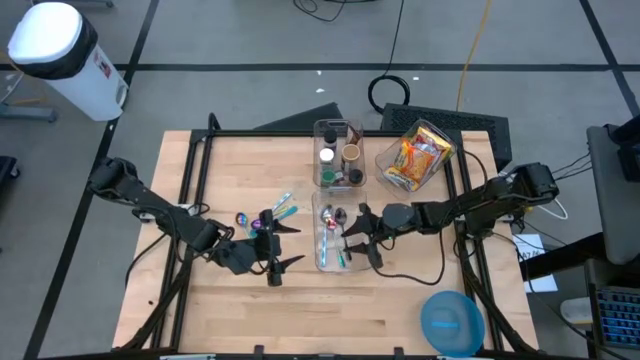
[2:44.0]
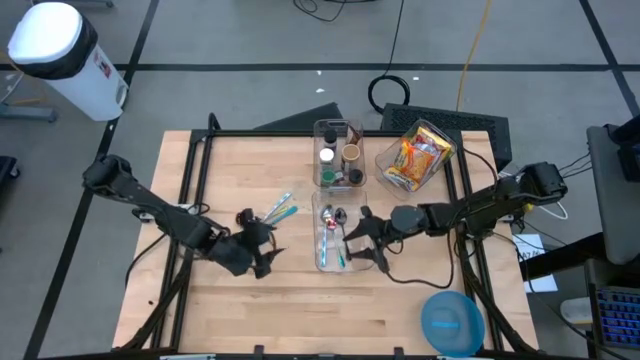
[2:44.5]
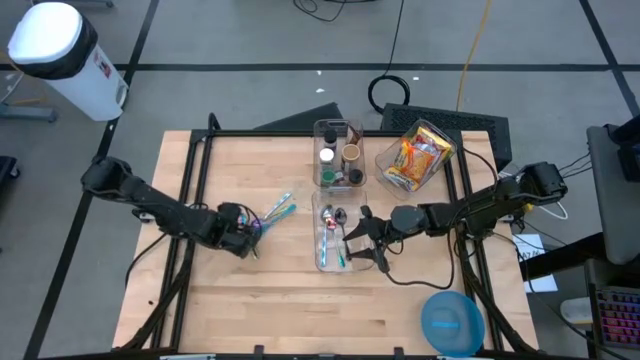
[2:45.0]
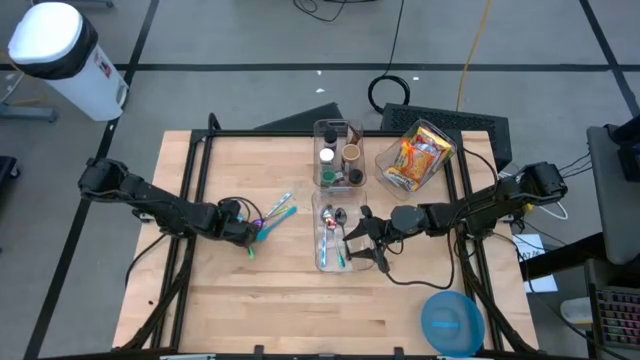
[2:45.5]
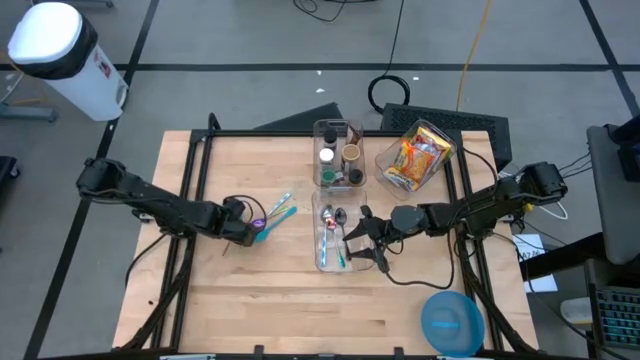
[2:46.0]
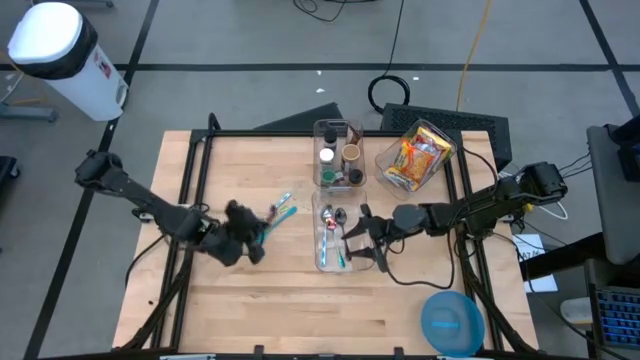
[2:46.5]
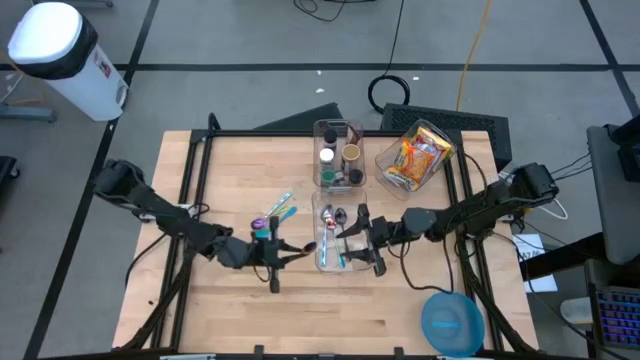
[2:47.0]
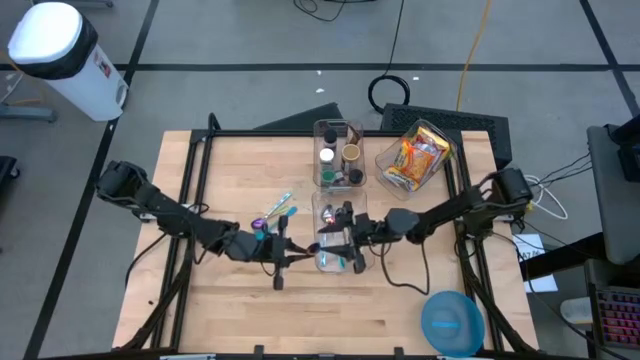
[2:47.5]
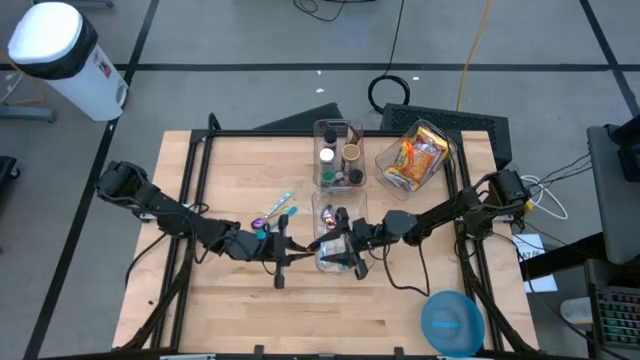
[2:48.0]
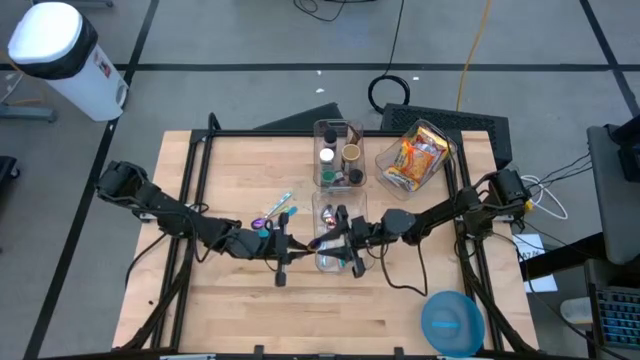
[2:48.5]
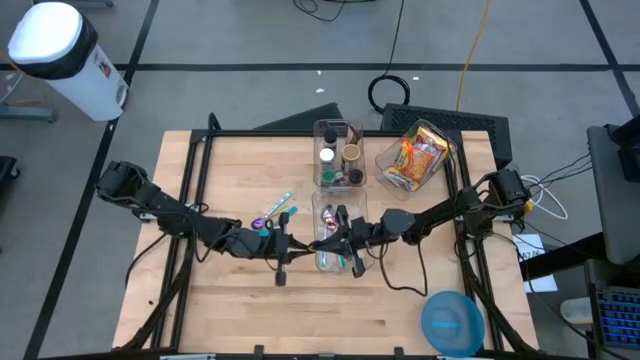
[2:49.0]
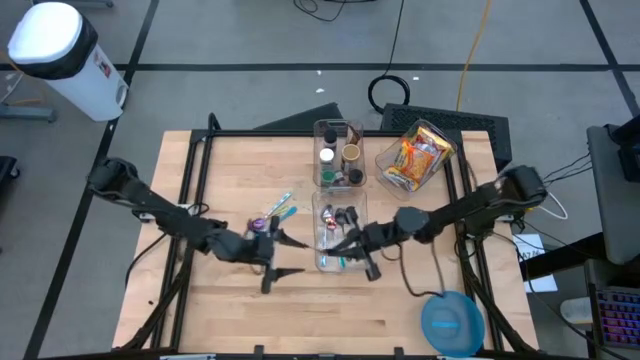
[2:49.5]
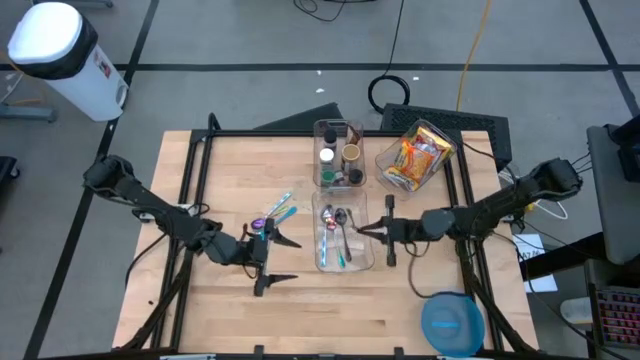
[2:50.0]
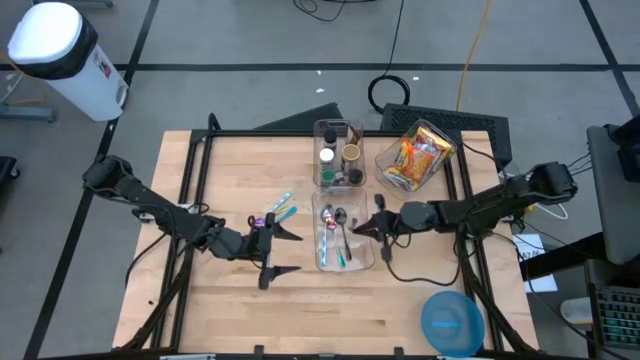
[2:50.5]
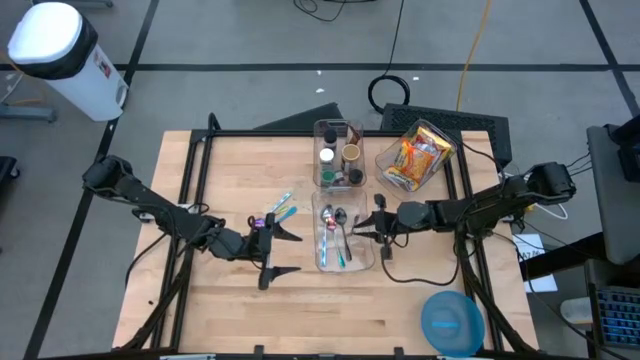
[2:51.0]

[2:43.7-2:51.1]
Task: Pick & Place Food Item
Put the bottom rainbow spoon into the bottom transparent bin

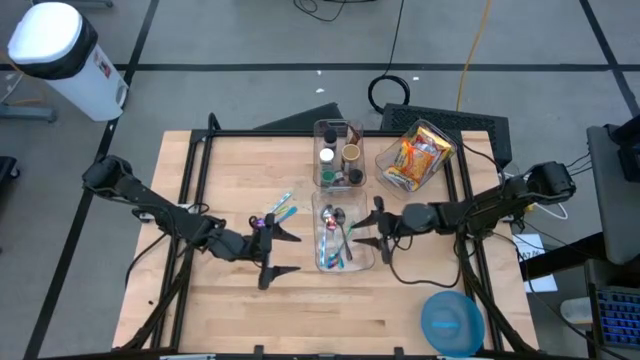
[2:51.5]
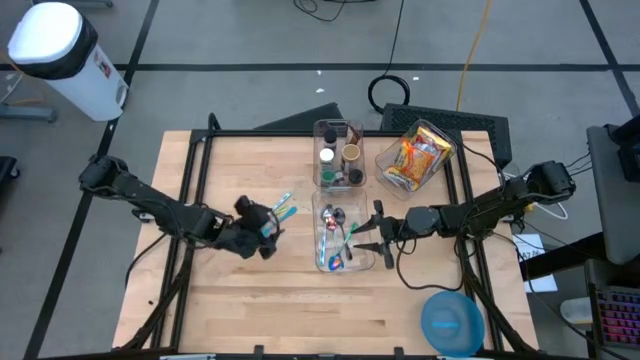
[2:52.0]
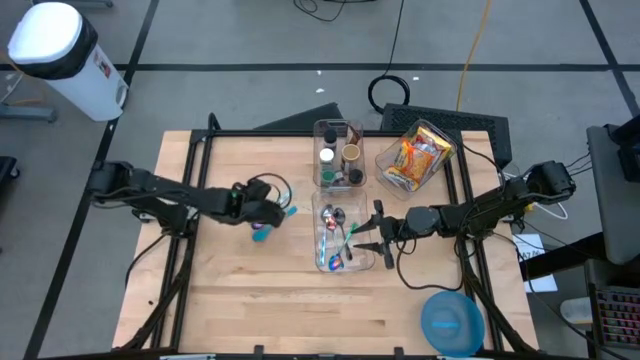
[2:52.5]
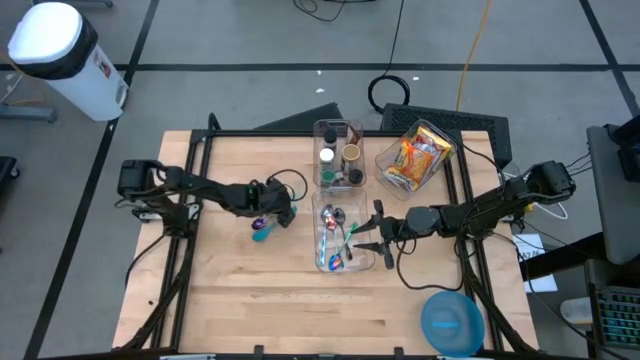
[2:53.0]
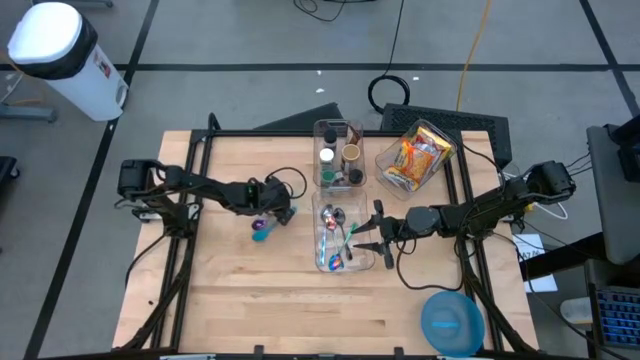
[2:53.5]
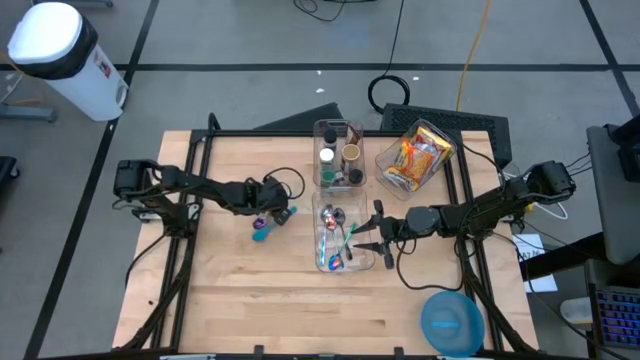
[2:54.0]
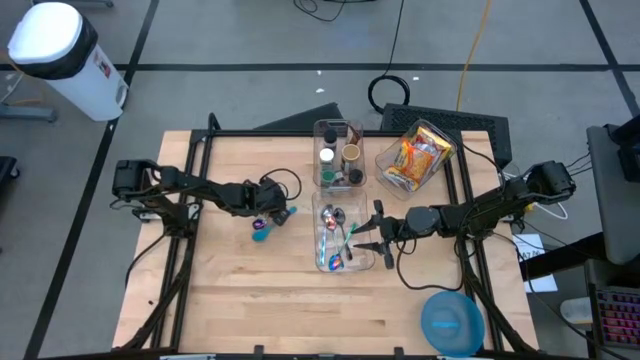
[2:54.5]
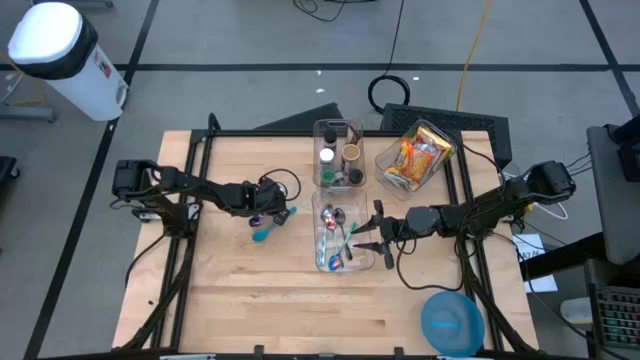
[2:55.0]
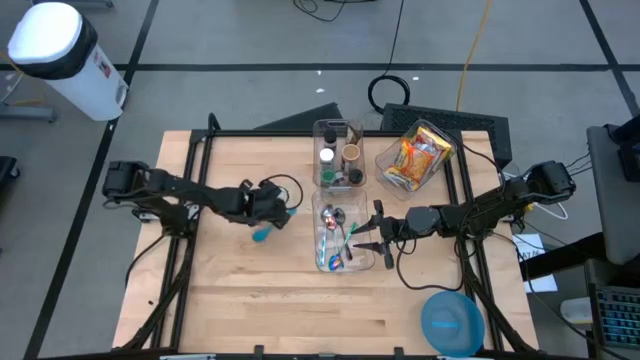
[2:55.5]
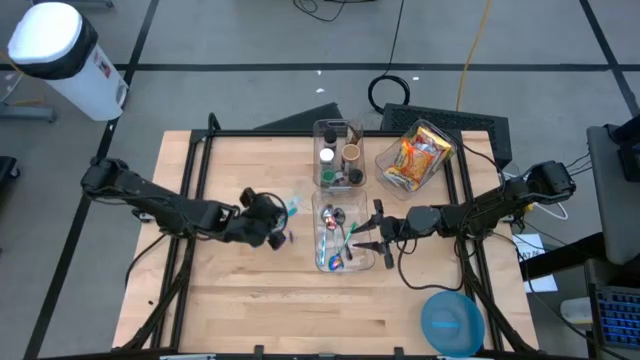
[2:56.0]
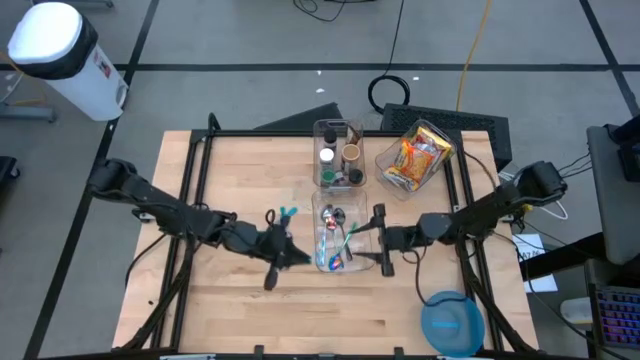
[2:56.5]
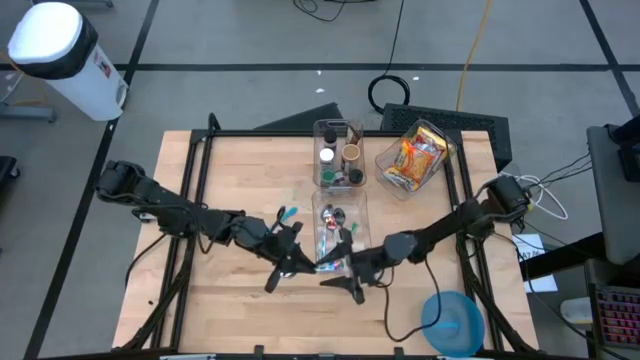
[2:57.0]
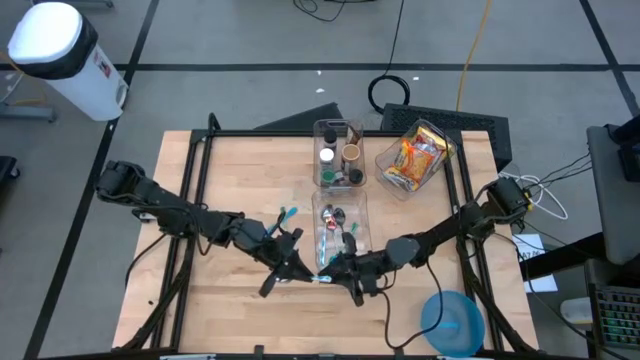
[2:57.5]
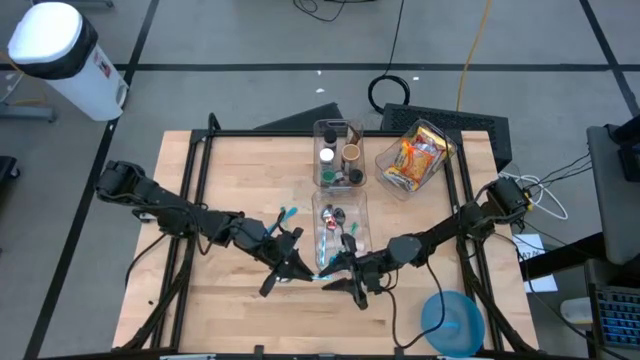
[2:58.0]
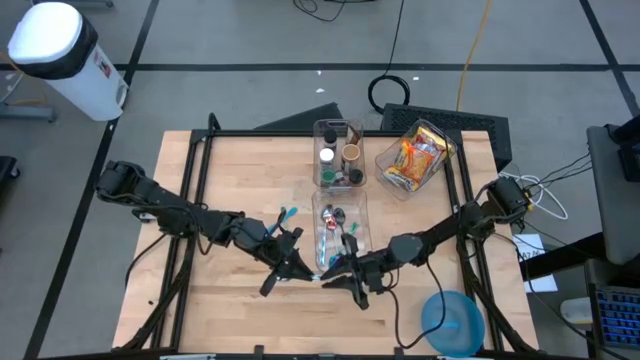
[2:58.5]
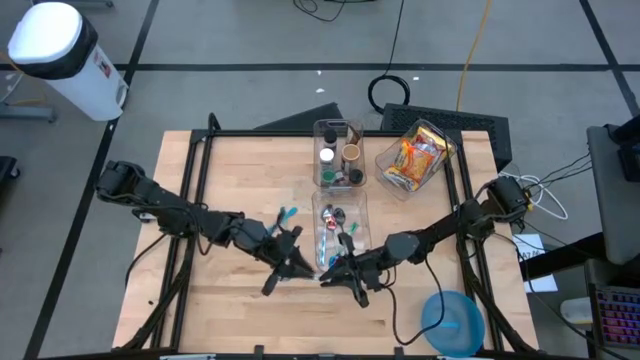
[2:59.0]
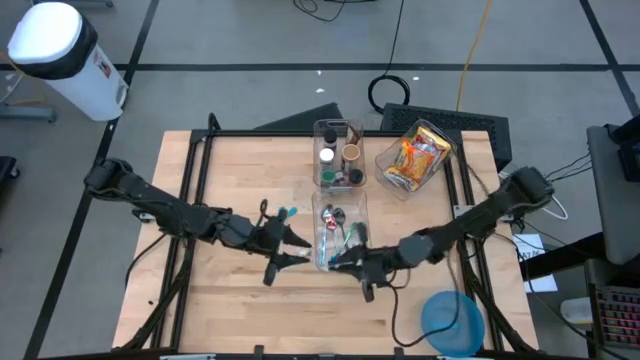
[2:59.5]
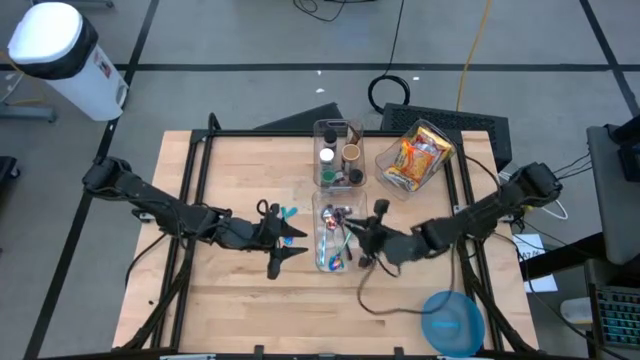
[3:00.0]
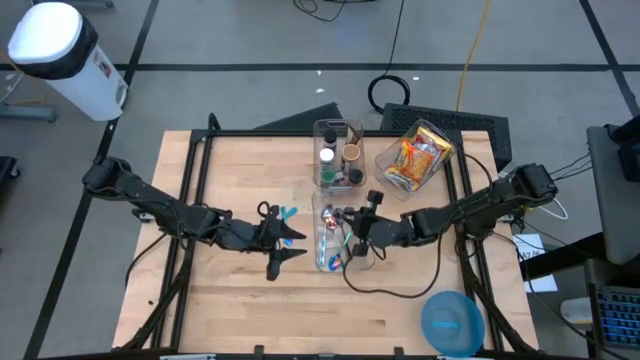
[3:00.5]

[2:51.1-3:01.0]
Put the white and blue spoon into the bottom transparent bin

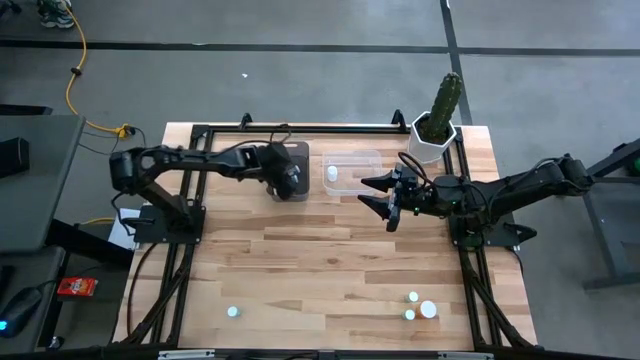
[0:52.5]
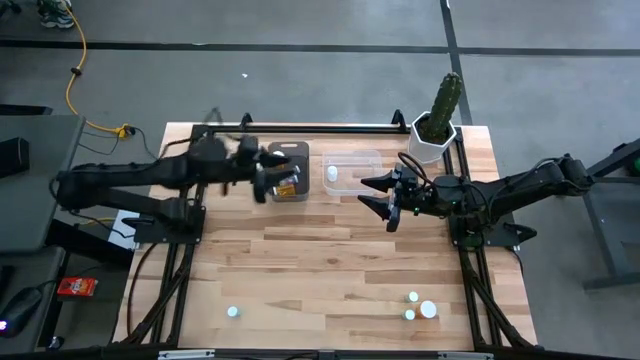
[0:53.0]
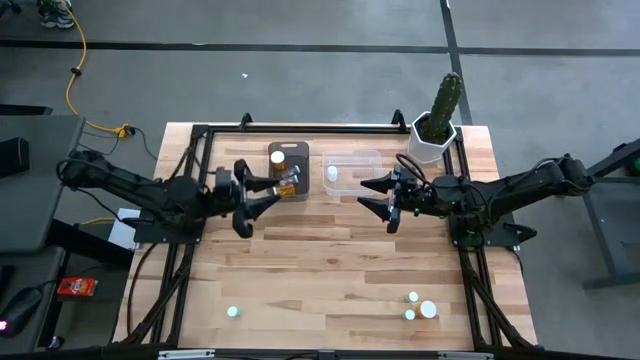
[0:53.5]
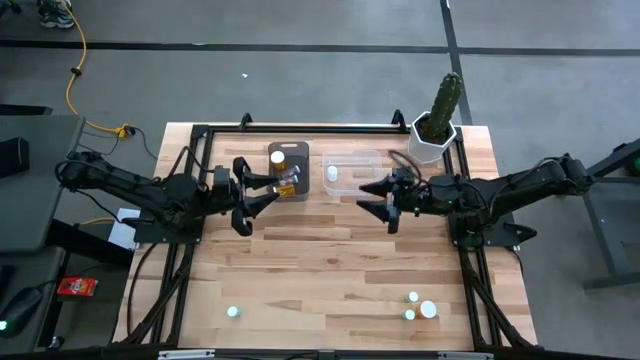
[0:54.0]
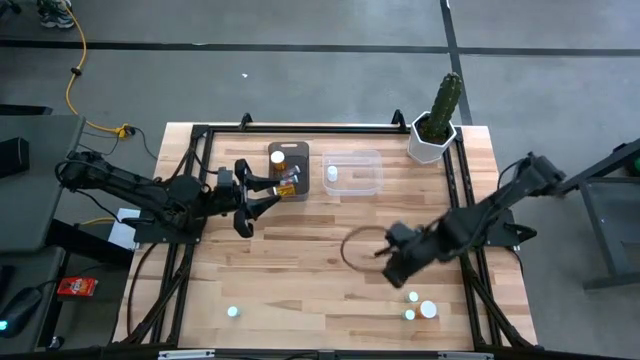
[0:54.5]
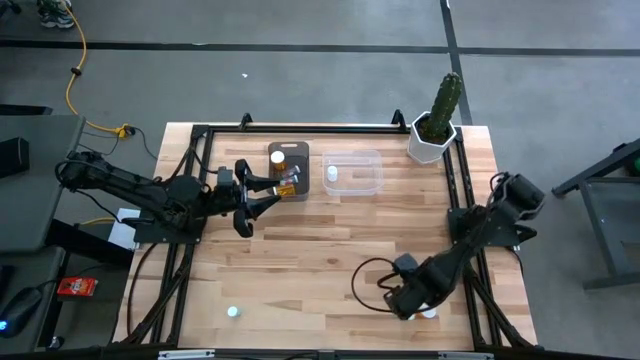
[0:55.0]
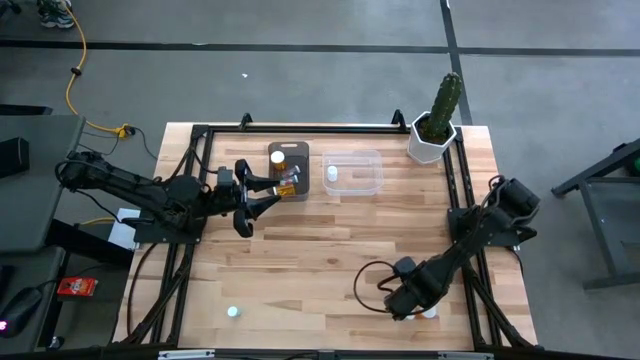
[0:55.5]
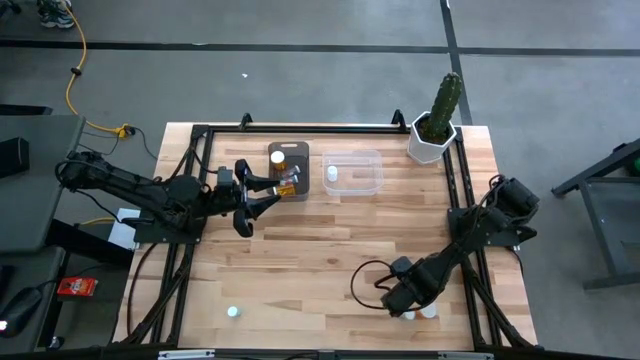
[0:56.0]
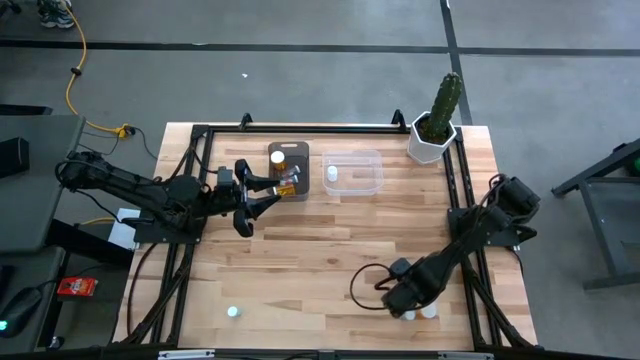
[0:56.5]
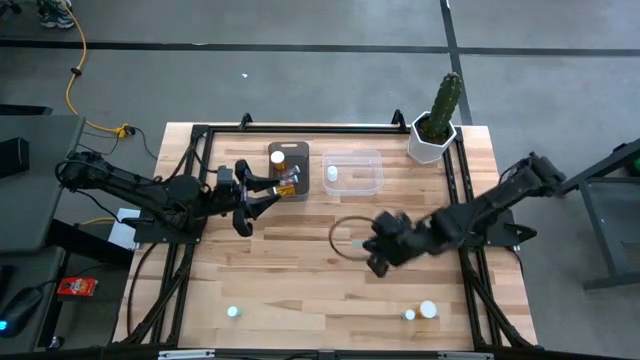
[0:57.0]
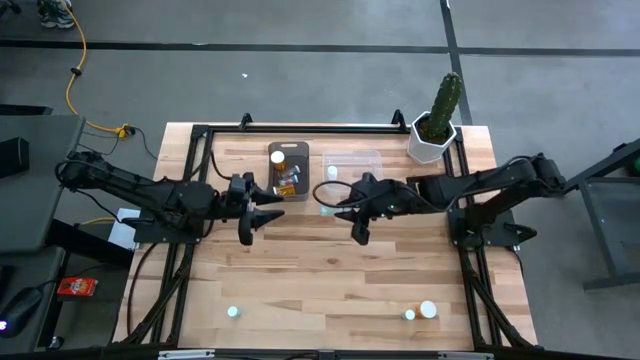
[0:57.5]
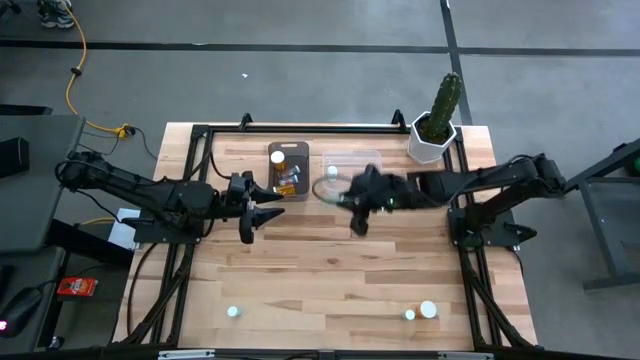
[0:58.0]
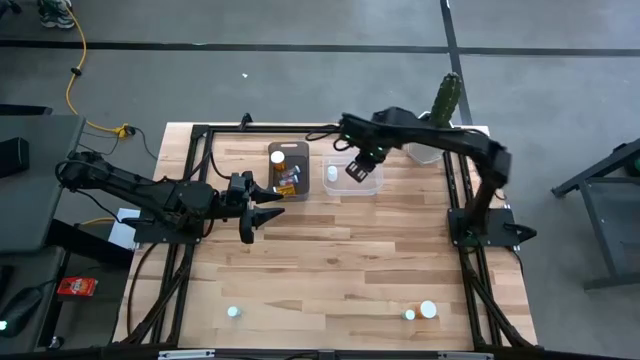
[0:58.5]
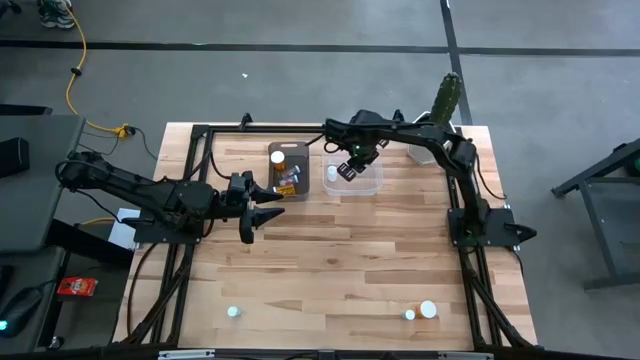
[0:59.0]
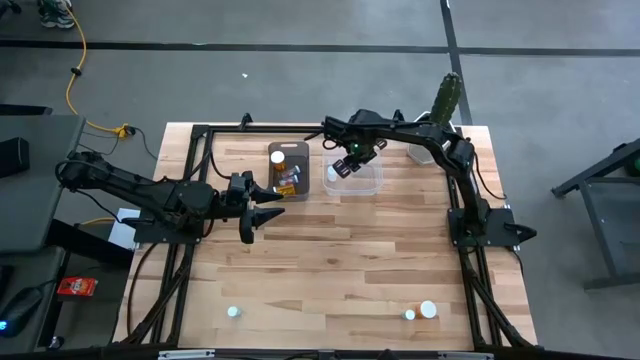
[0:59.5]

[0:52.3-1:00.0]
Task: Pick and place medicine bottles into bin by pill shape (circle, oval)
Put the top green tablet bottle into the transparent bin
